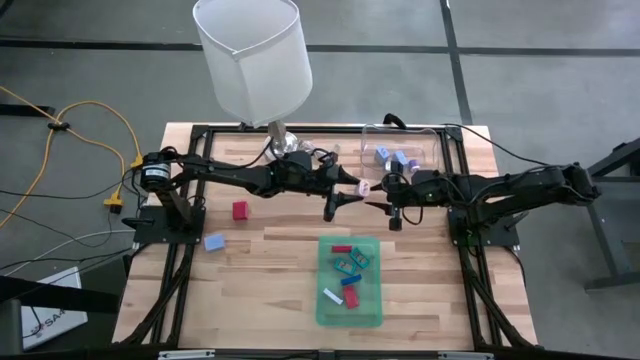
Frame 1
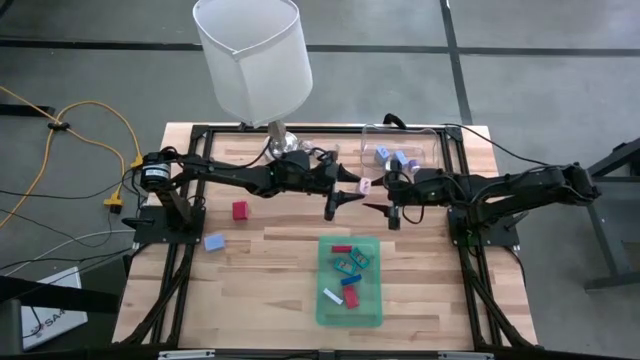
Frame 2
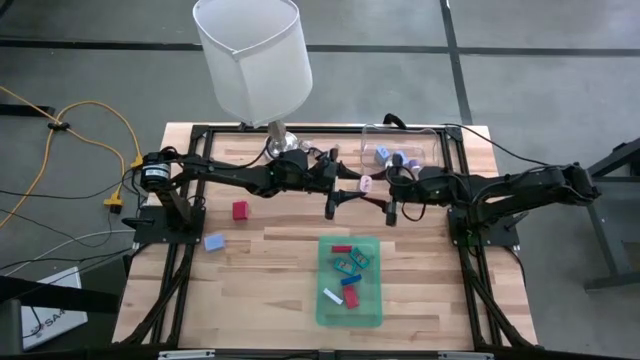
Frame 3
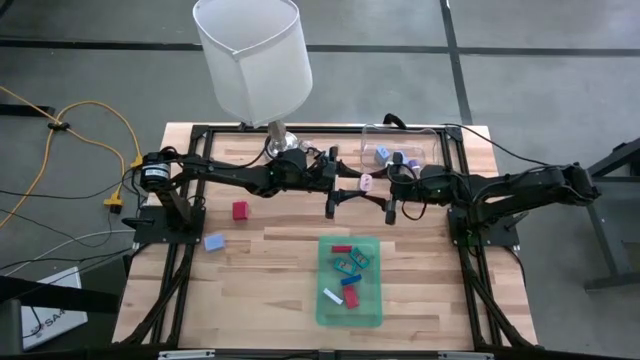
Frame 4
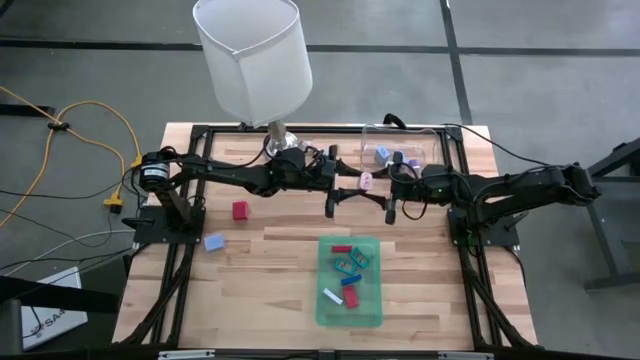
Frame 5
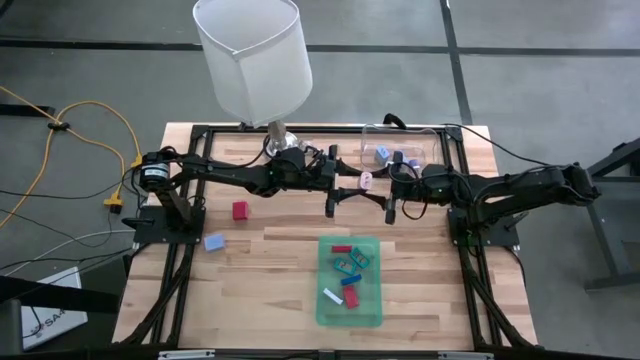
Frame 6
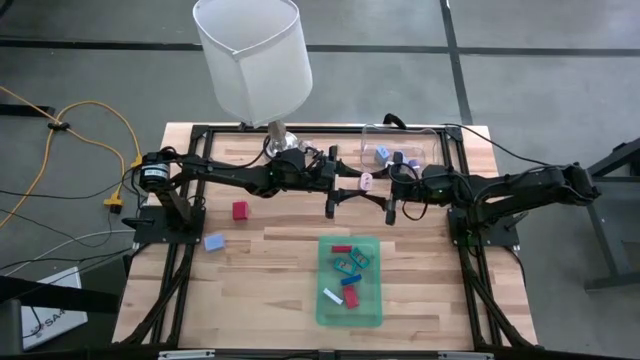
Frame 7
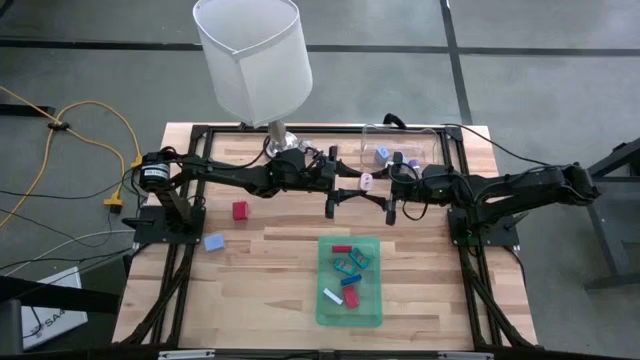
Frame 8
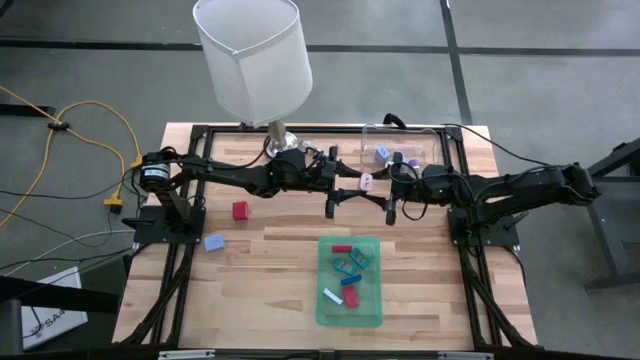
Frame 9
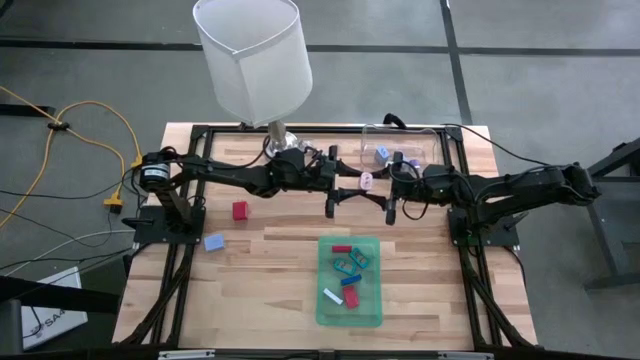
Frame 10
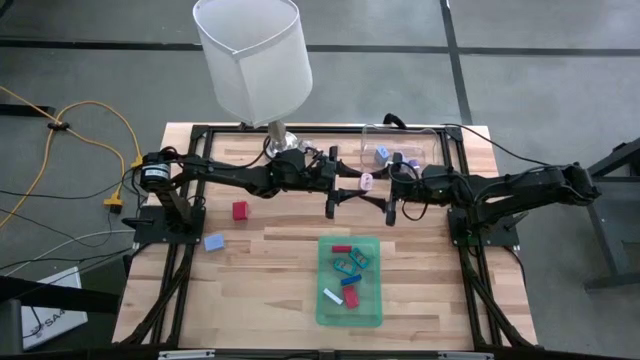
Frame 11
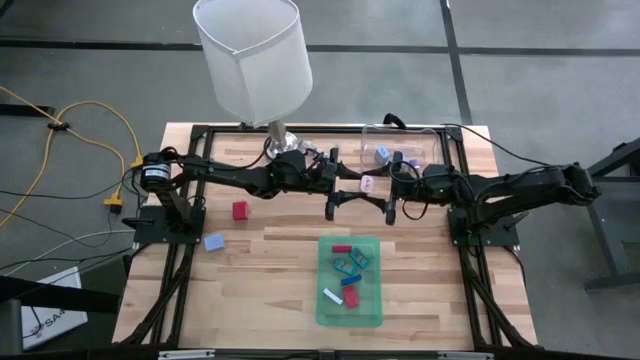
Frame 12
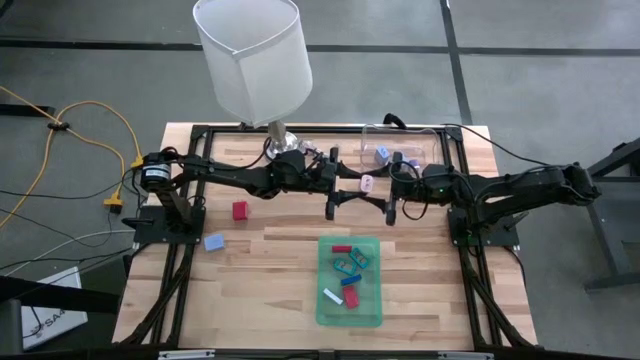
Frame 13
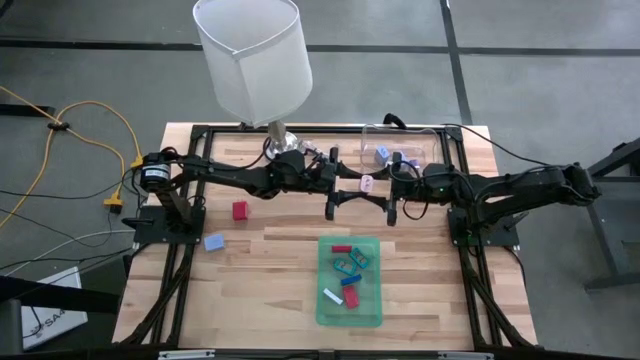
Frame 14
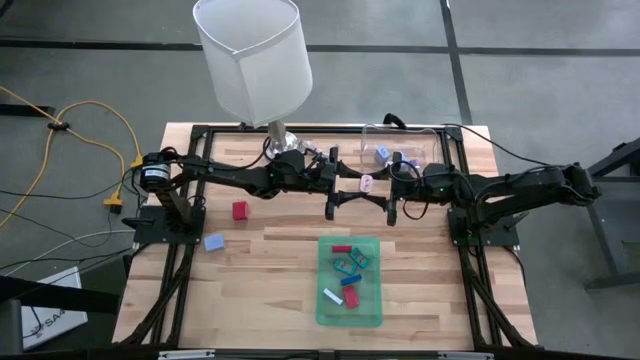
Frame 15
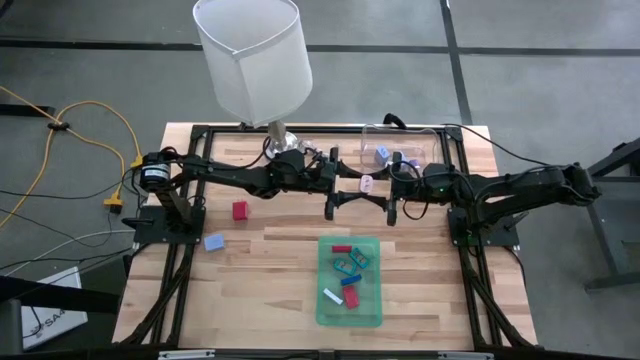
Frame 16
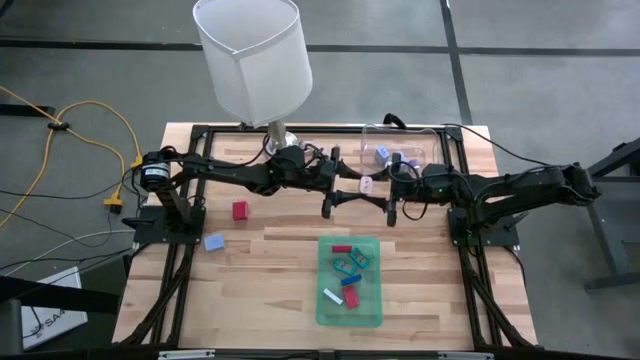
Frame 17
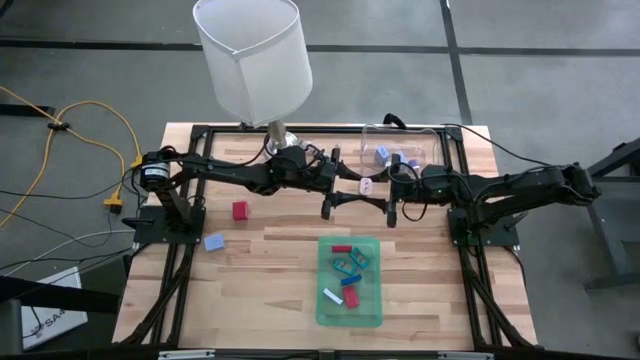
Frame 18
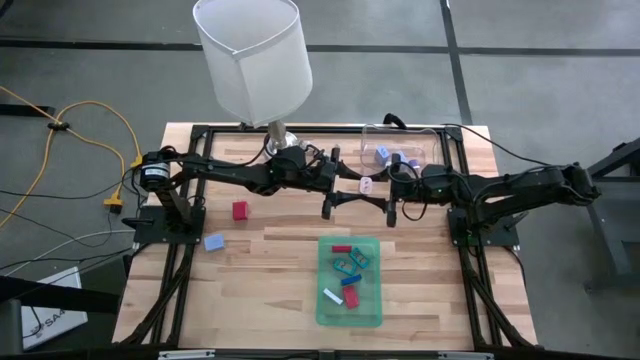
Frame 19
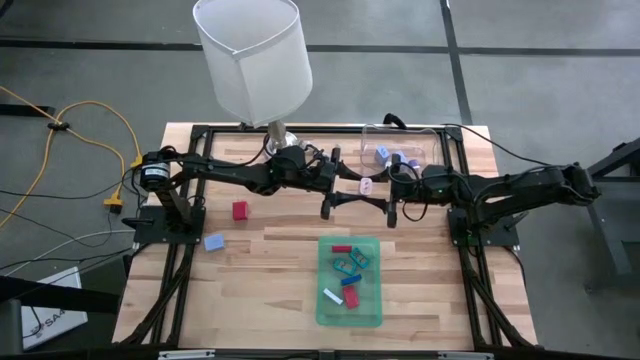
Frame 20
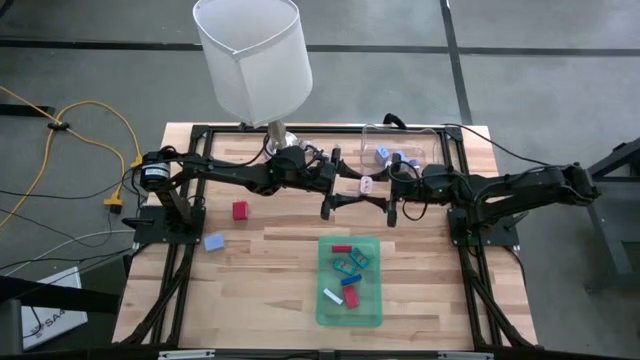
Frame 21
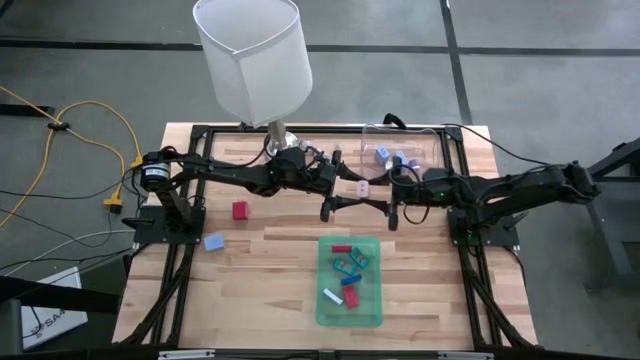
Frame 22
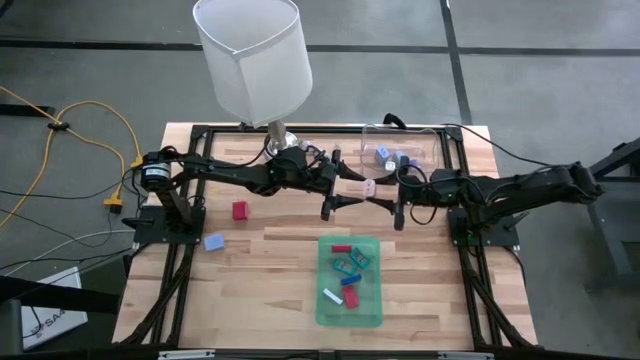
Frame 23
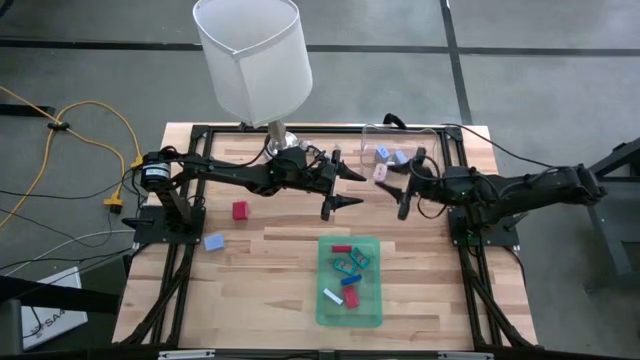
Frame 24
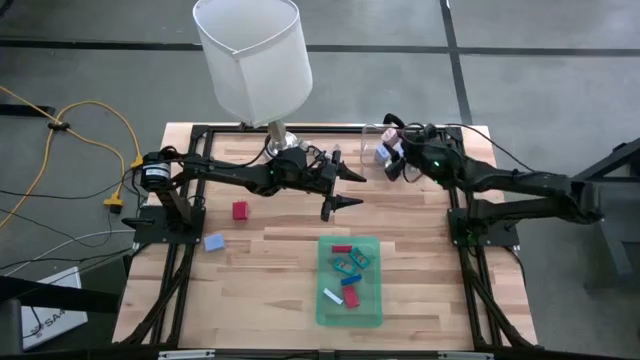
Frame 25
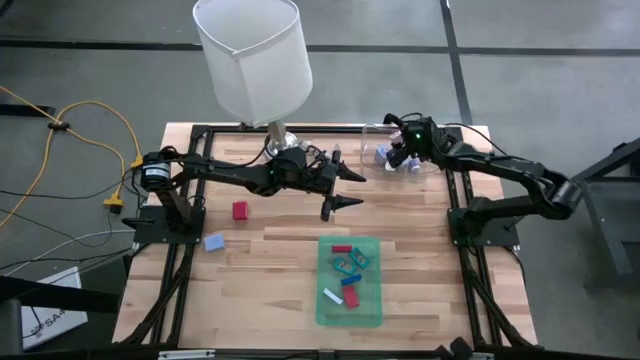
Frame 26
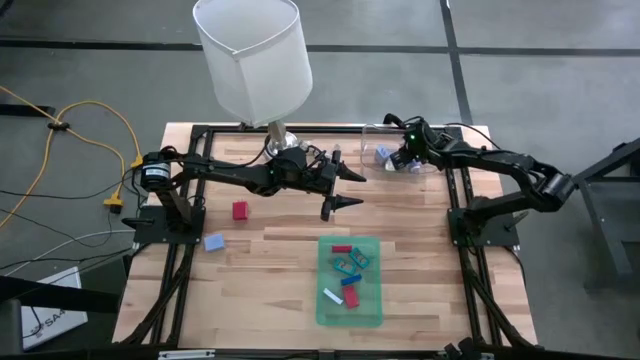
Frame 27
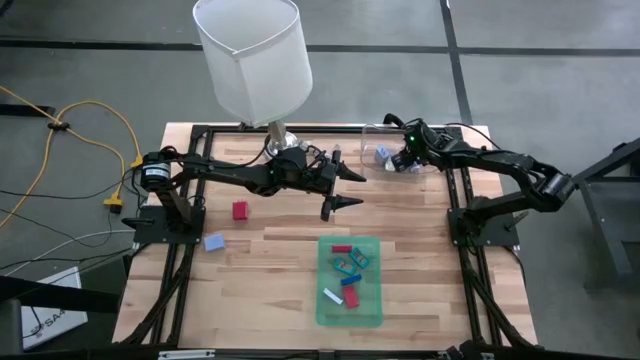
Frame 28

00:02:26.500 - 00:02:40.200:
Task: Pick & Place Office items
Put the pink charger adapter into the transparent bin

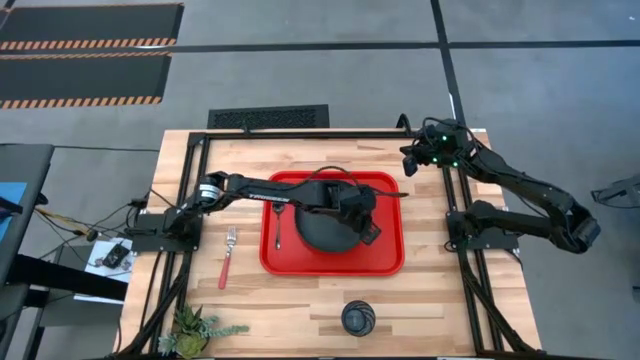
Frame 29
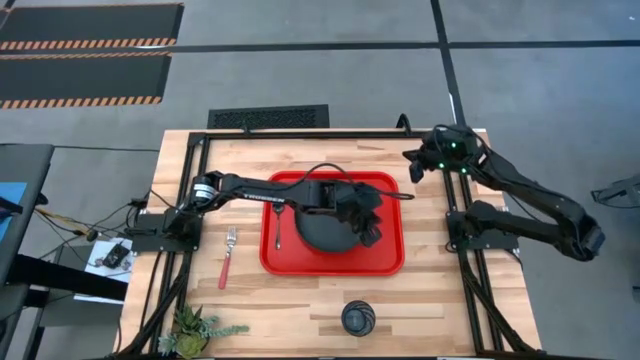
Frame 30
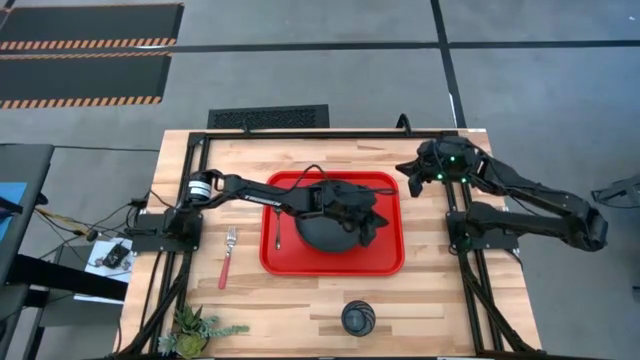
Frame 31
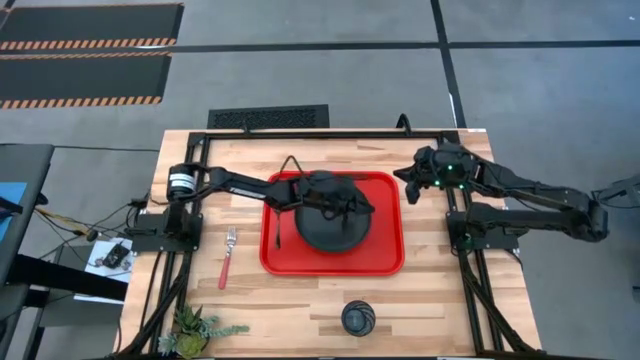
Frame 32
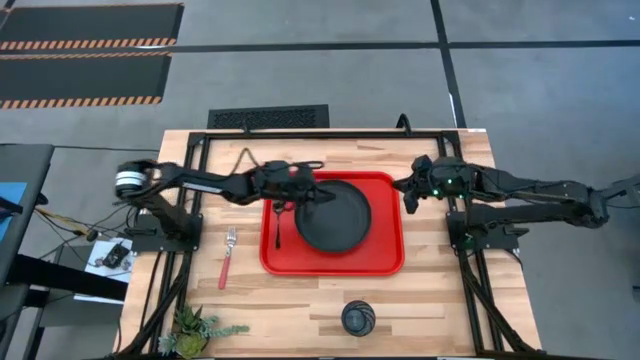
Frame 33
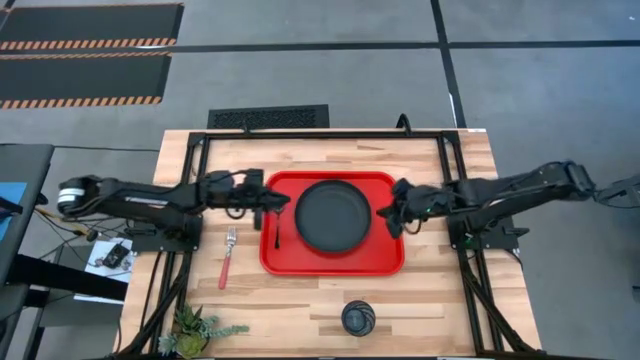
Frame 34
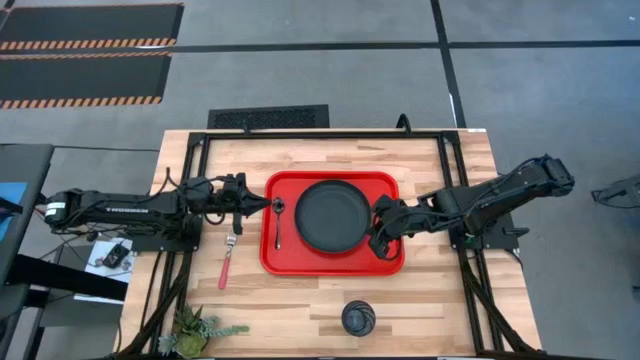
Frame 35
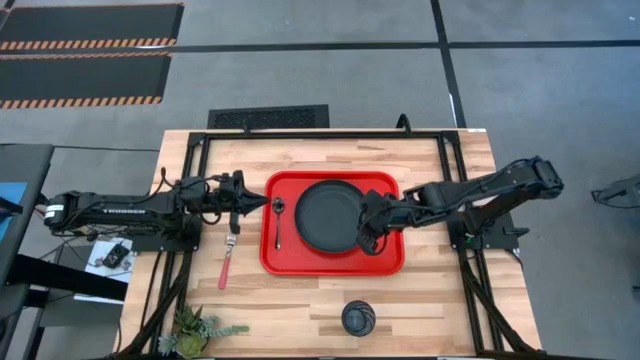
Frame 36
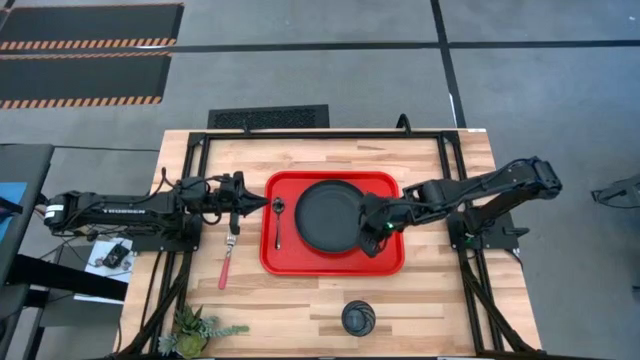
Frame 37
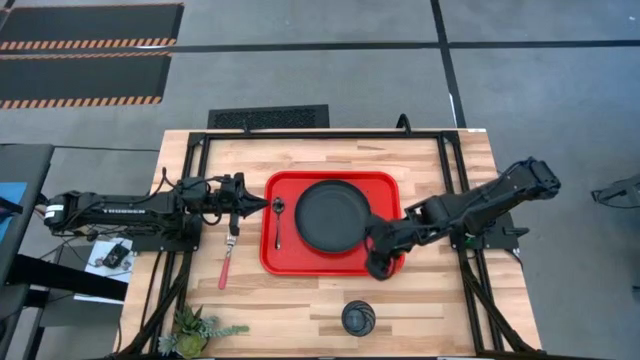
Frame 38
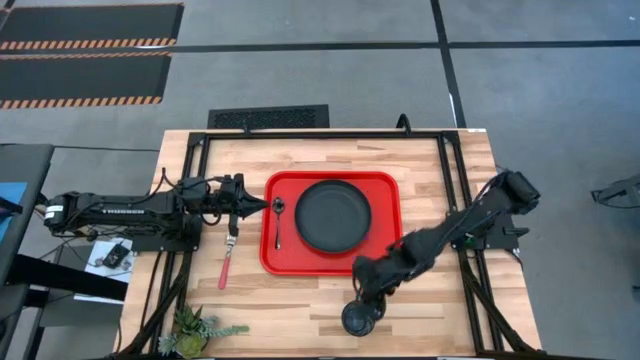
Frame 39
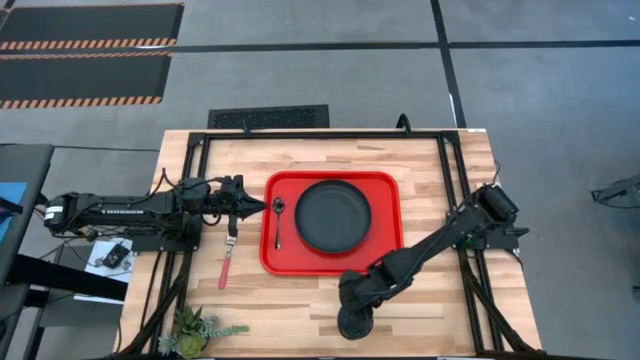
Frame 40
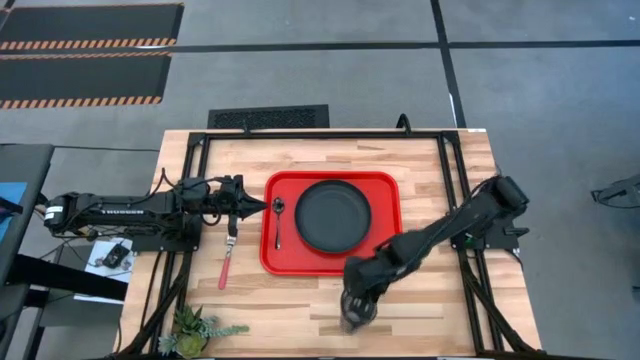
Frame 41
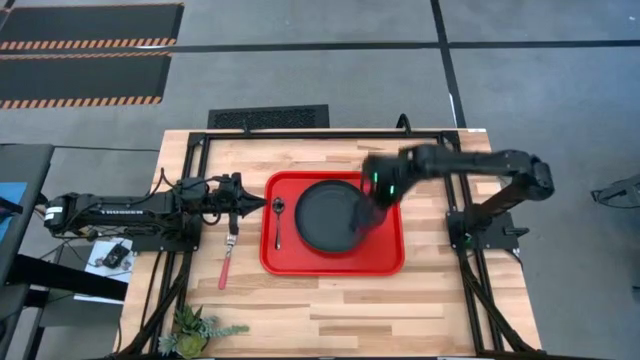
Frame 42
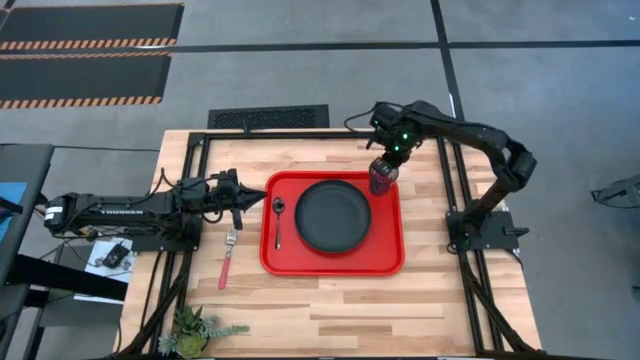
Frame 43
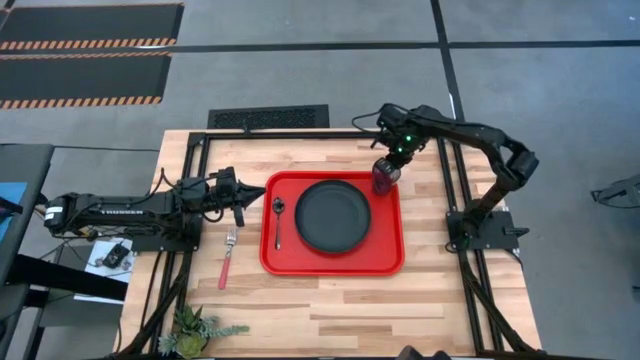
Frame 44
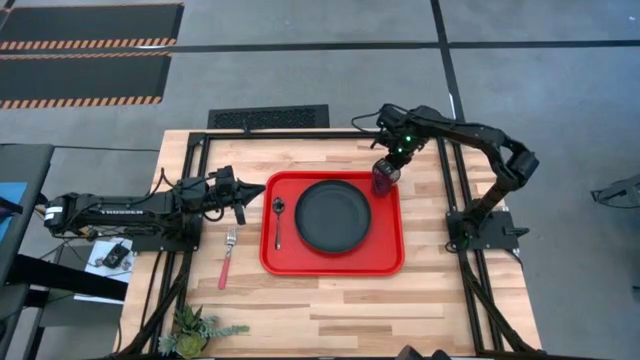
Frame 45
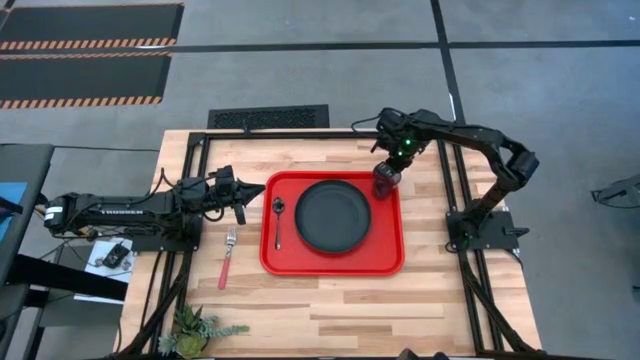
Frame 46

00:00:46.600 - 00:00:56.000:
Task: Pick and place plate/cup/fork/spoon on tray
Put the transparent blue cup on the orange tray
